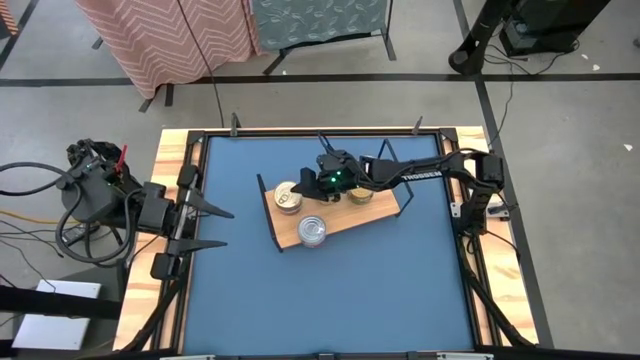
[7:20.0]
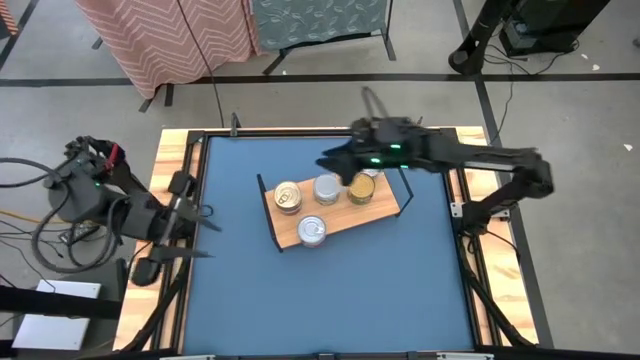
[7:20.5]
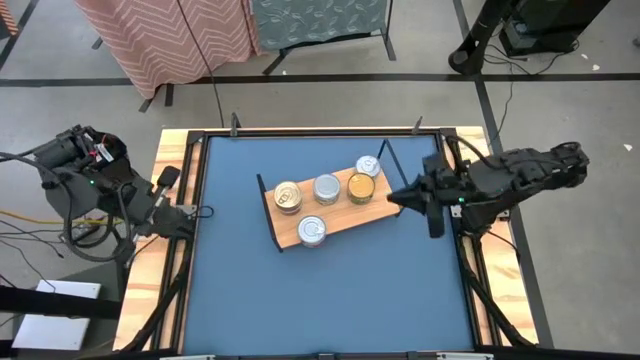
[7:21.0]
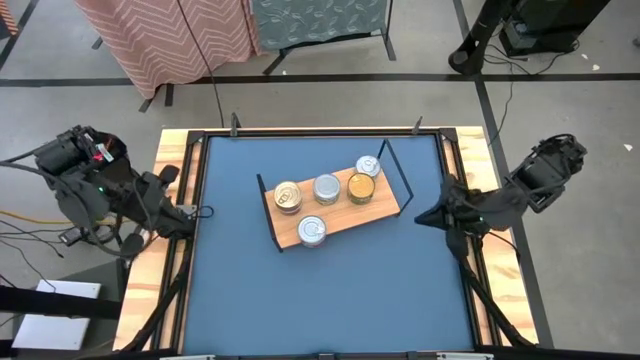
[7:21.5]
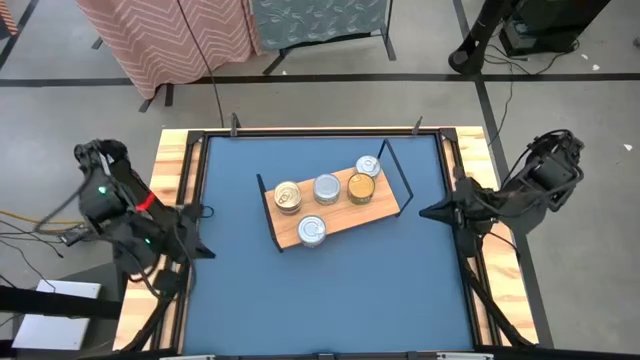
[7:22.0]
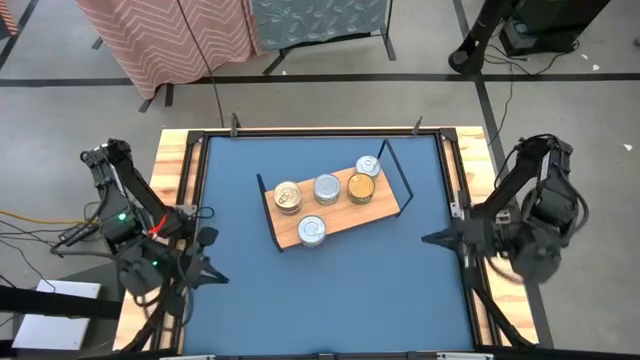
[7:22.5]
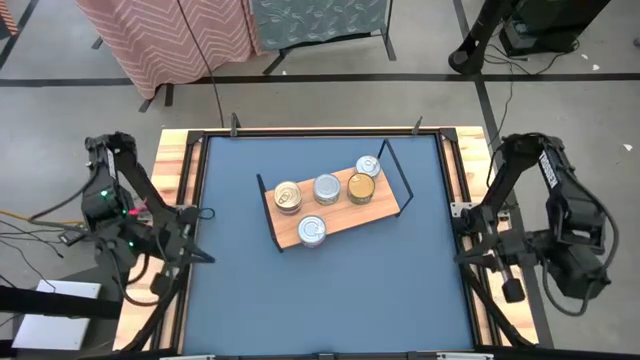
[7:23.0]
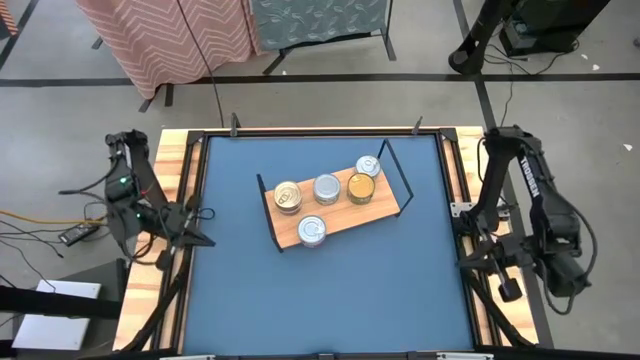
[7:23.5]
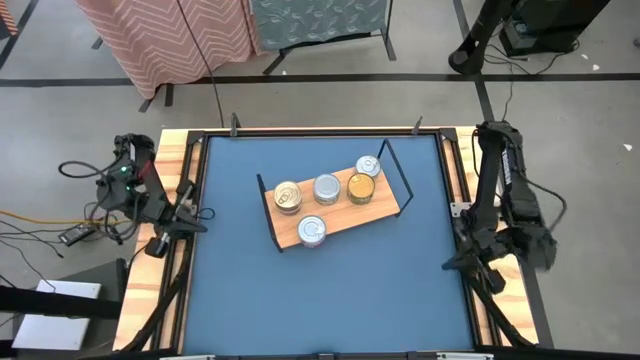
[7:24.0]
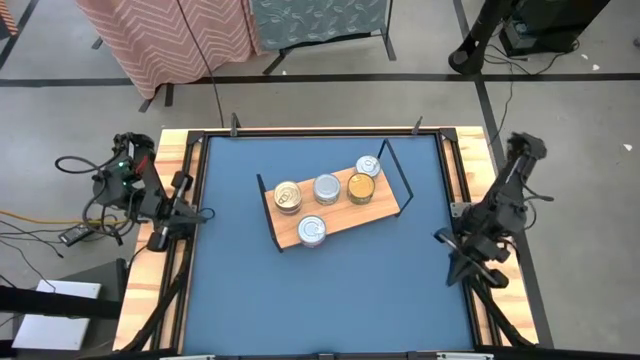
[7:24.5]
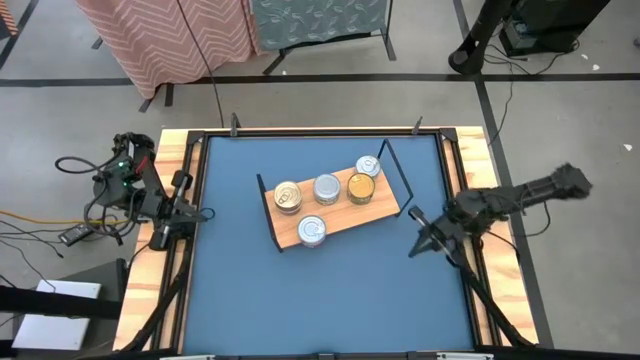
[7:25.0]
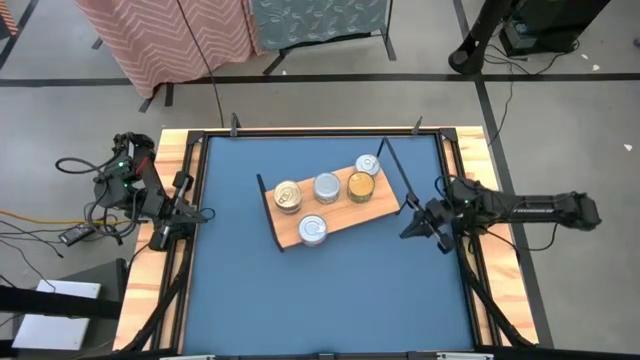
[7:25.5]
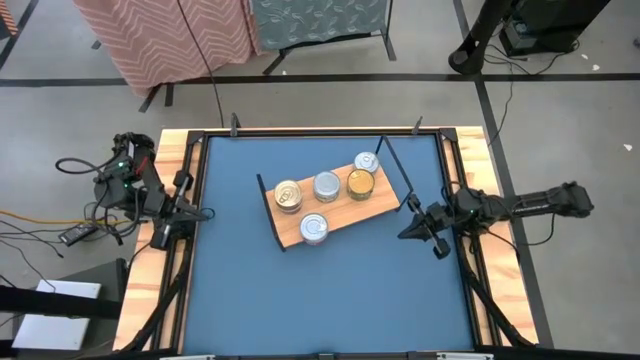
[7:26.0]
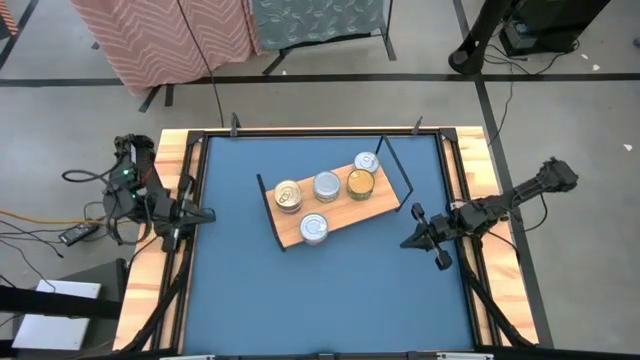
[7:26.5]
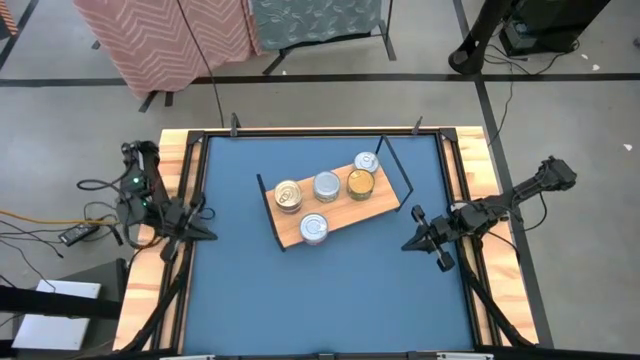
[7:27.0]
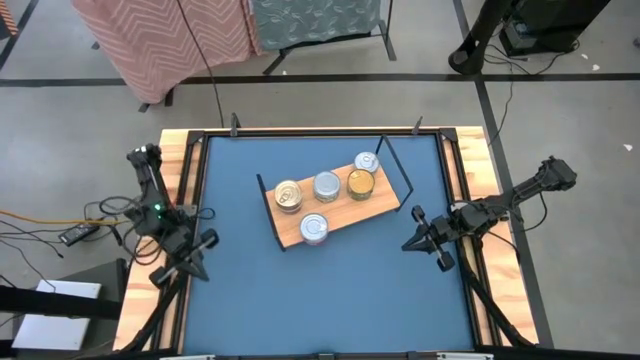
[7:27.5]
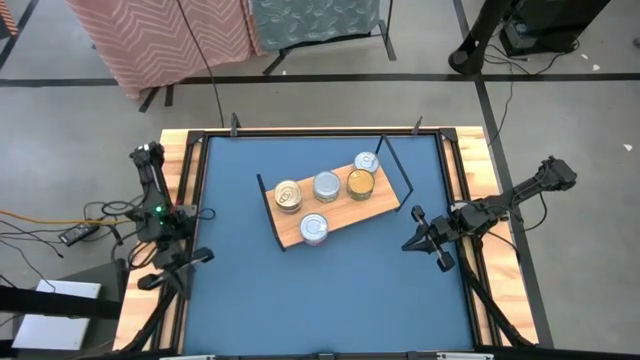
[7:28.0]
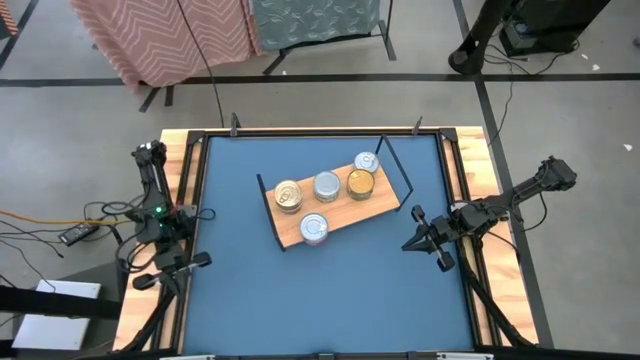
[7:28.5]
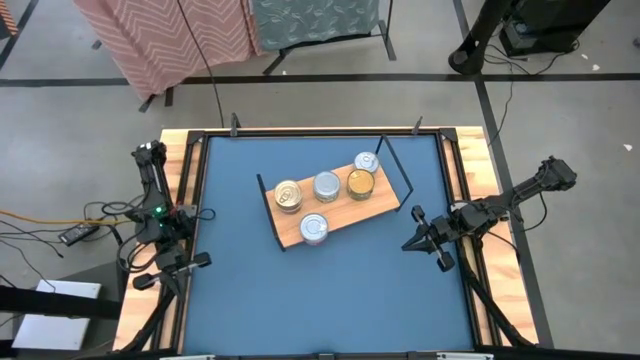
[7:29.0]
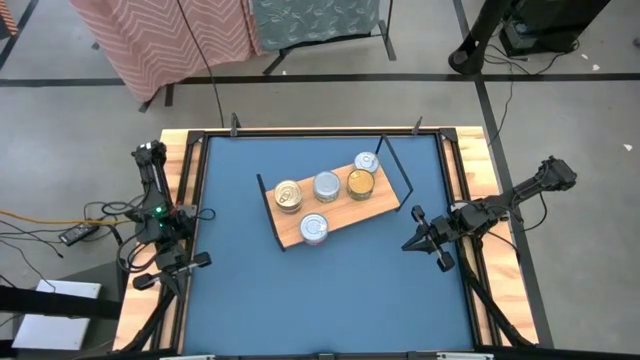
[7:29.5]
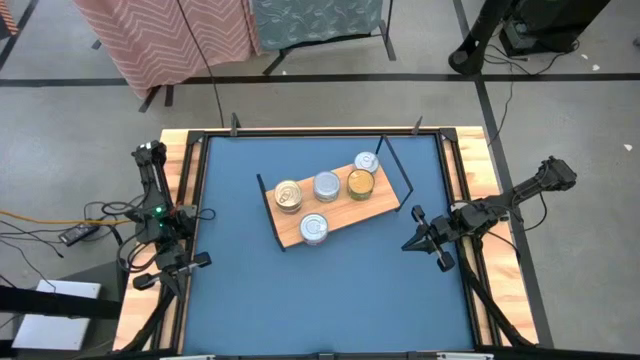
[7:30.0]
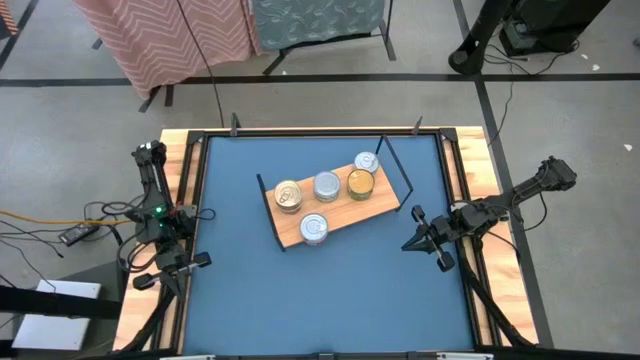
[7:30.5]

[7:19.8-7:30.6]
Task: Stack canned seafood by type on shelf
Return to Home Position

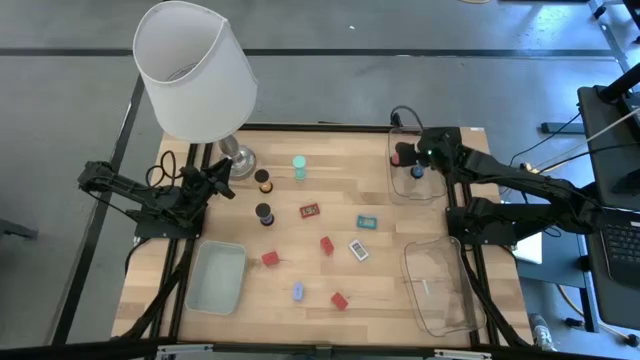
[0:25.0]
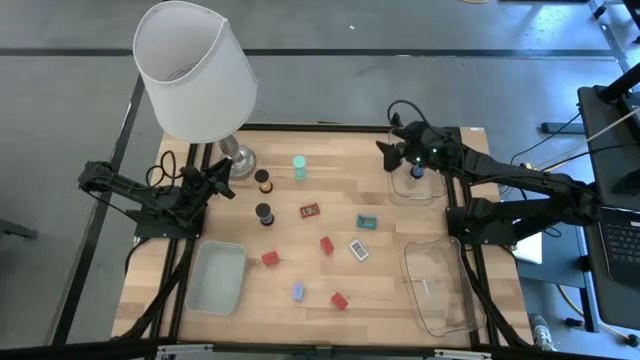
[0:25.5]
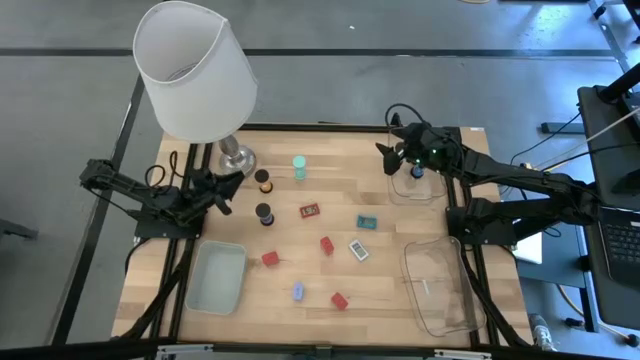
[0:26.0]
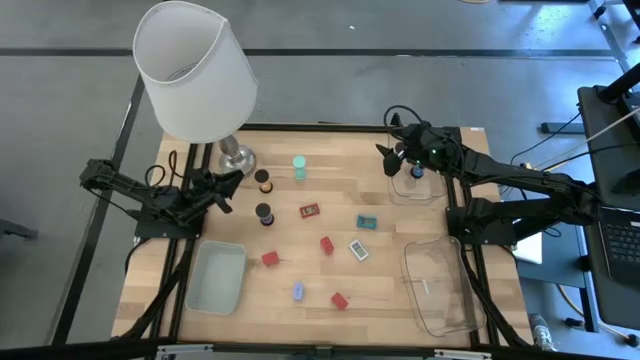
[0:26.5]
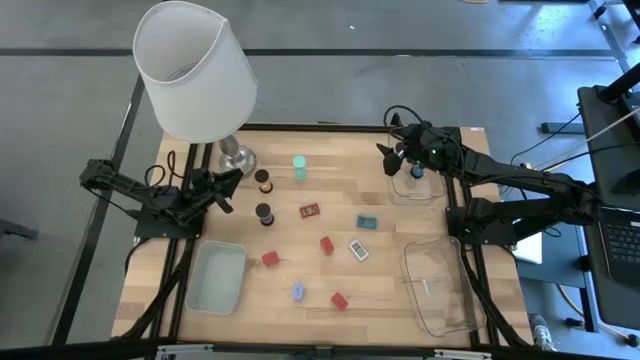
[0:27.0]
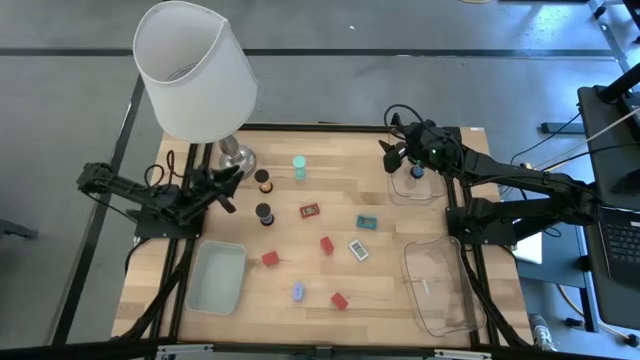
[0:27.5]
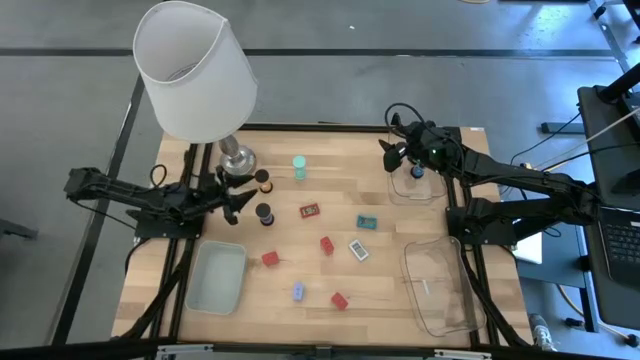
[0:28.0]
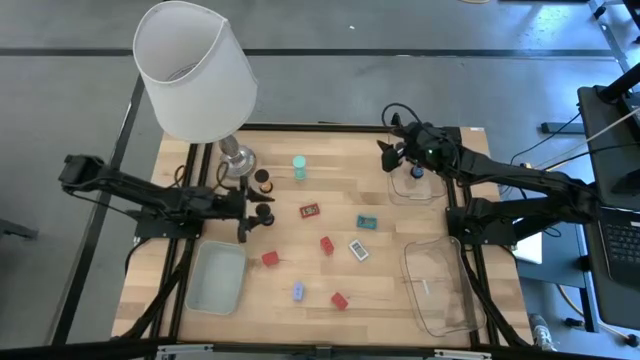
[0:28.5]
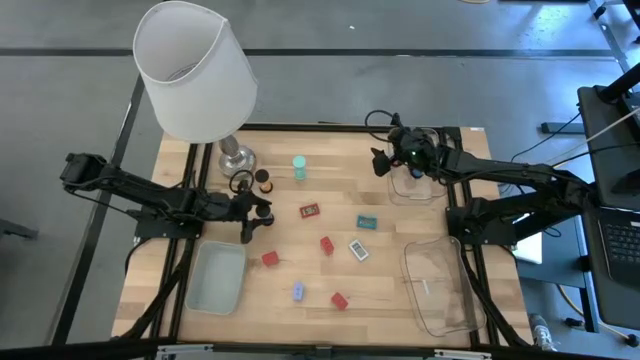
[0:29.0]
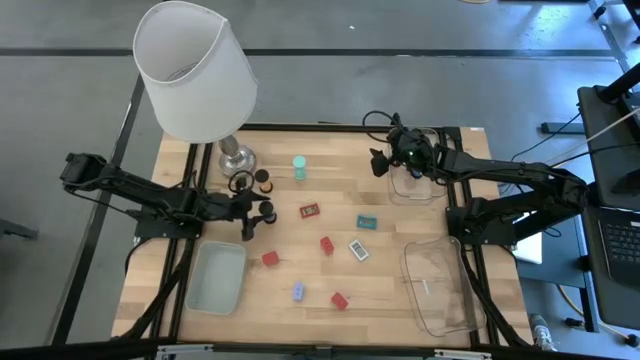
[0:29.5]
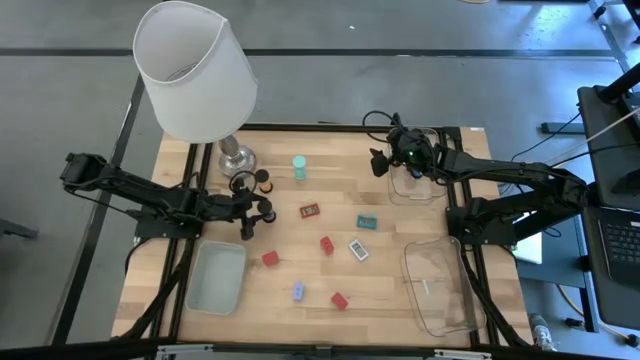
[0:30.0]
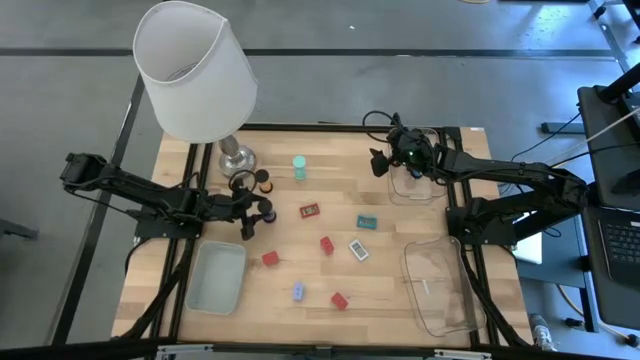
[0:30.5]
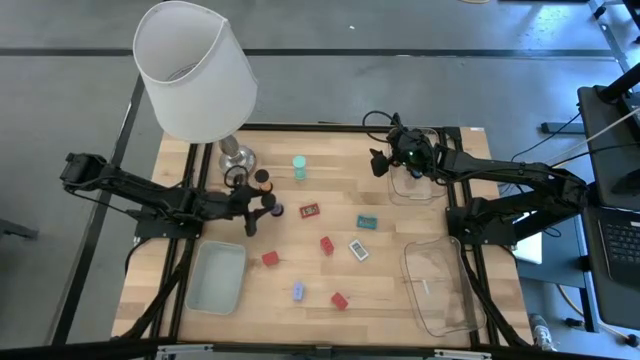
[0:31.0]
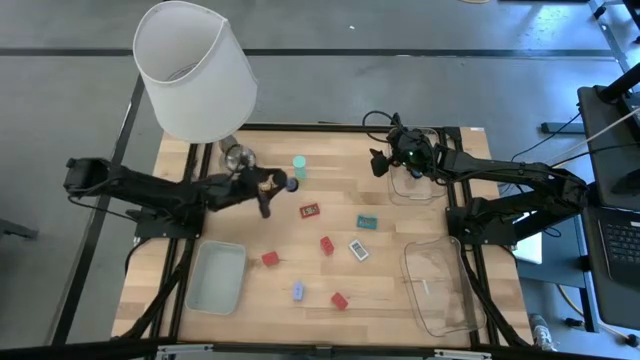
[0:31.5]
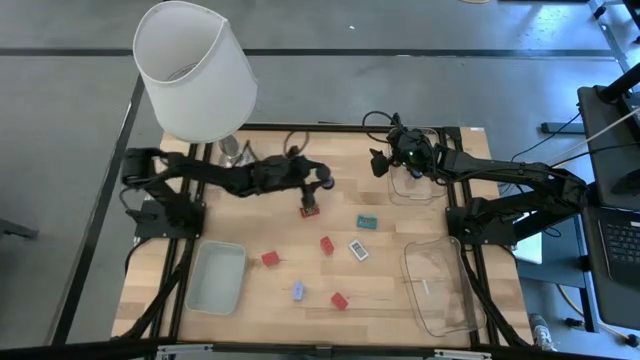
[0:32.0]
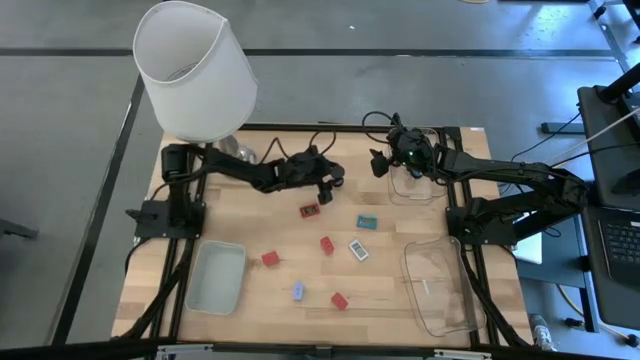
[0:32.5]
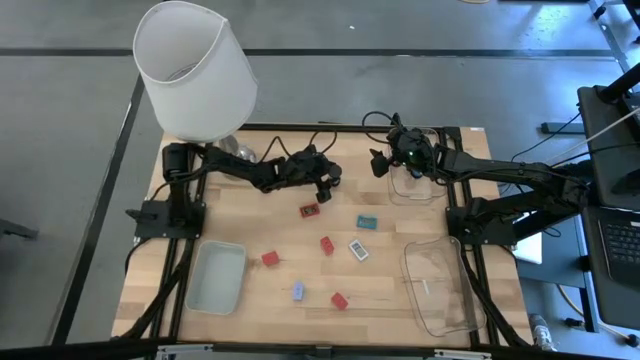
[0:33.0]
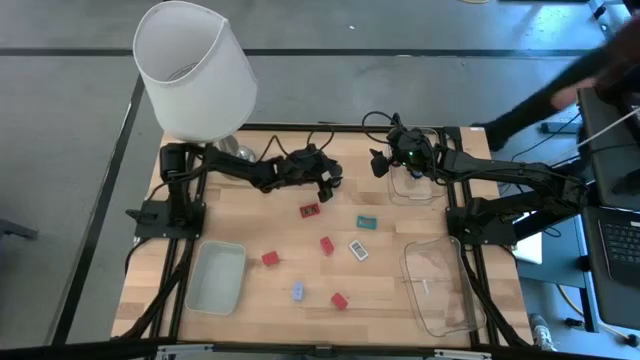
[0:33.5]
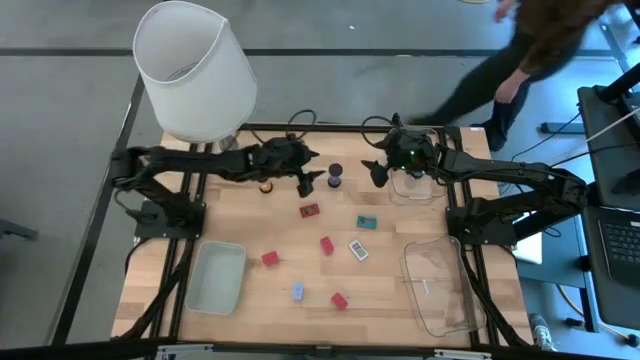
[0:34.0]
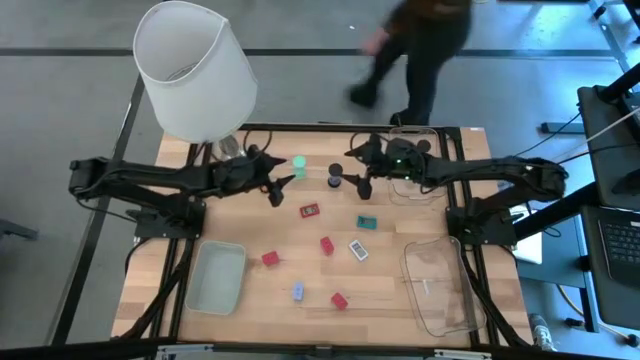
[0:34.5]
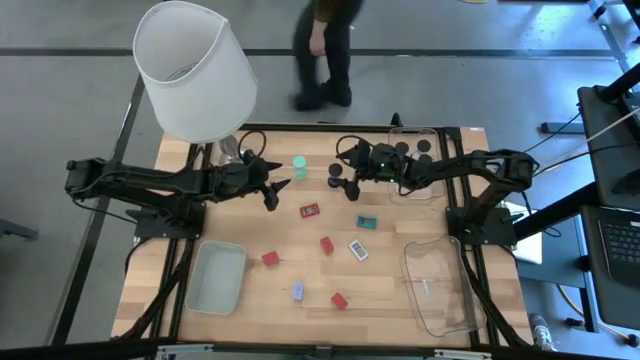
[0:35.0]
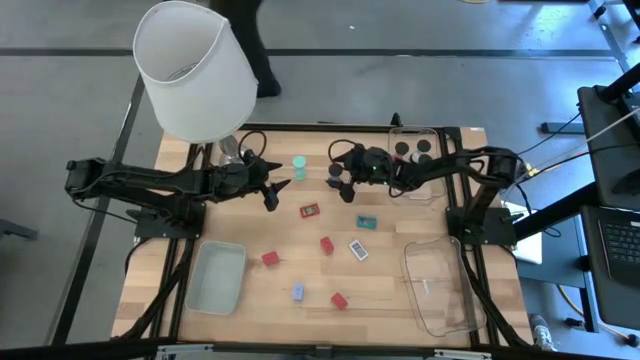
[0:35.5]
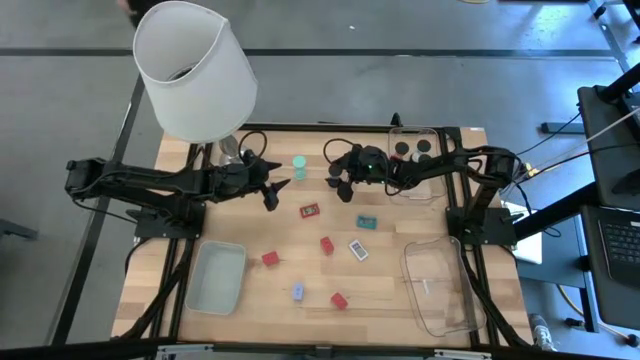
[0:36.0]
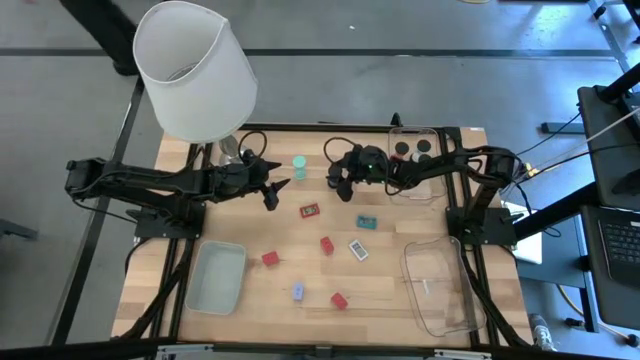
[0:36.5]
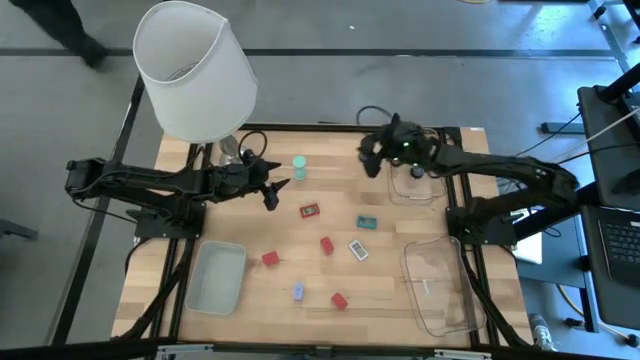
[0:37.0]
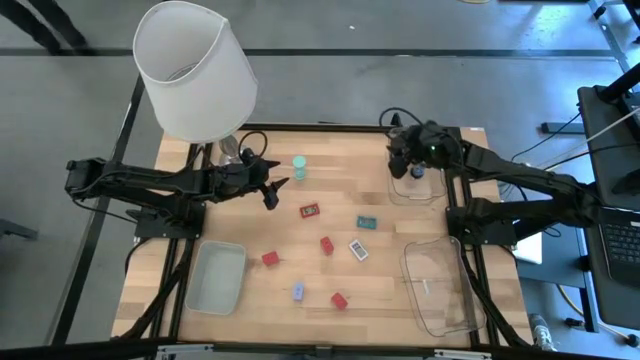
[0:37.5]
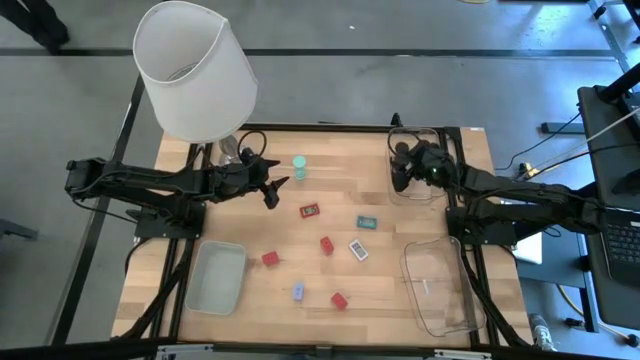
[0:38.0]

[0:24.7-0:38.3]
Task: Pick & Place Office items
Put the purple sand timer into the top transparent bin
